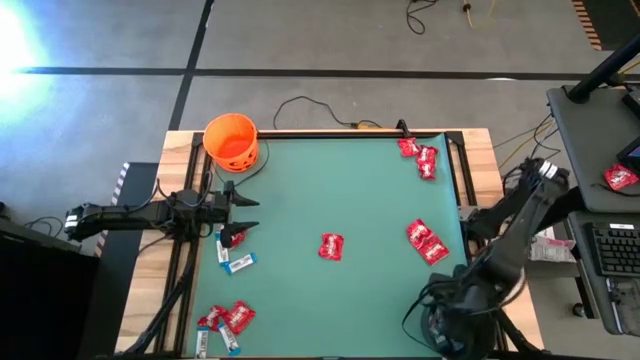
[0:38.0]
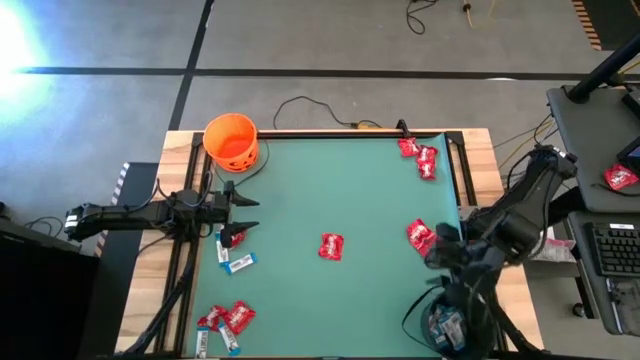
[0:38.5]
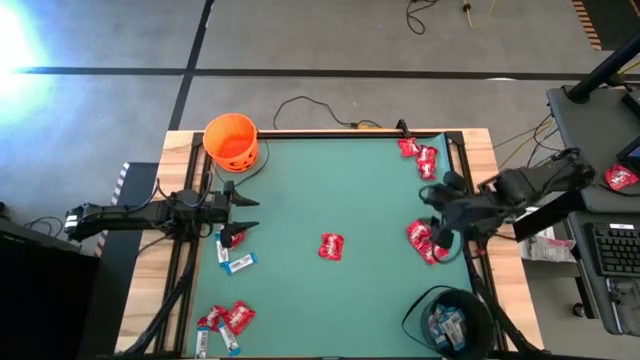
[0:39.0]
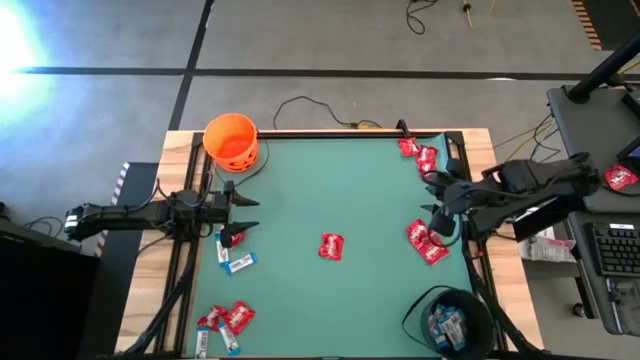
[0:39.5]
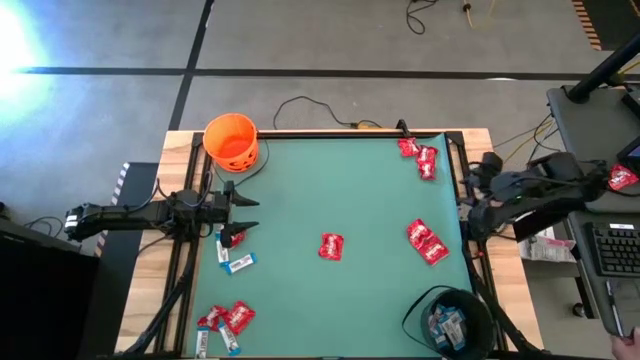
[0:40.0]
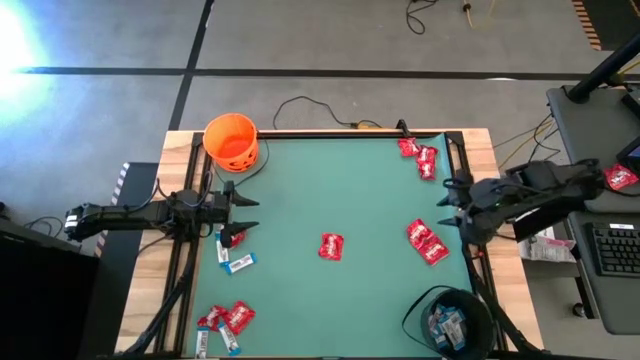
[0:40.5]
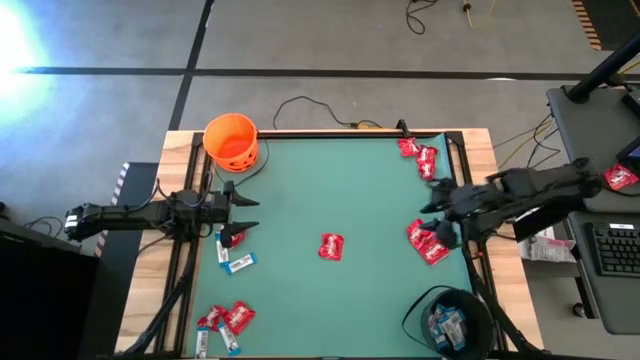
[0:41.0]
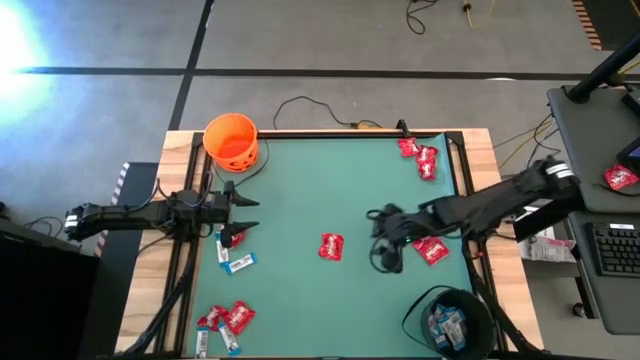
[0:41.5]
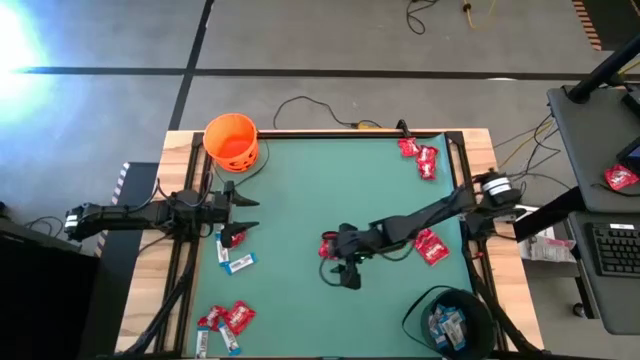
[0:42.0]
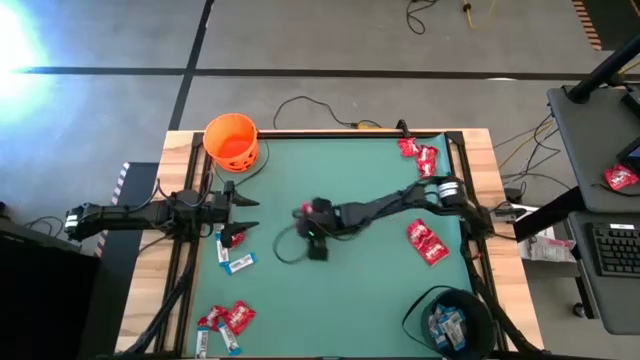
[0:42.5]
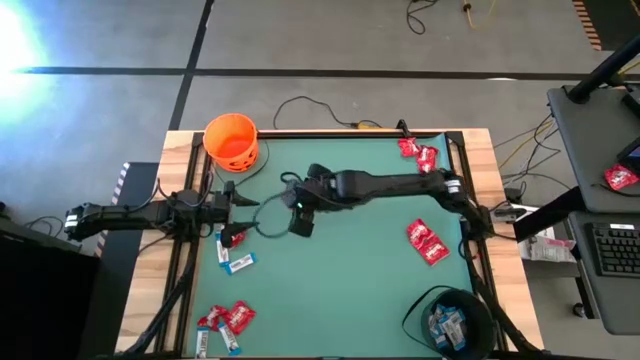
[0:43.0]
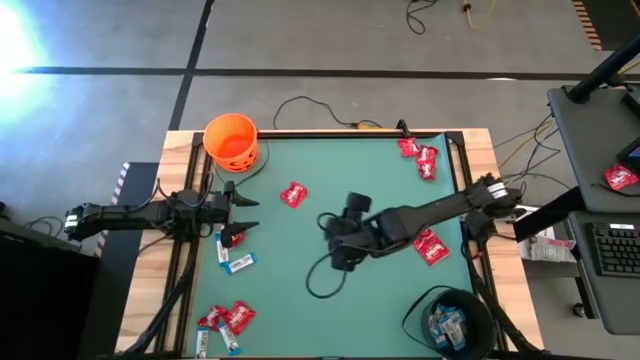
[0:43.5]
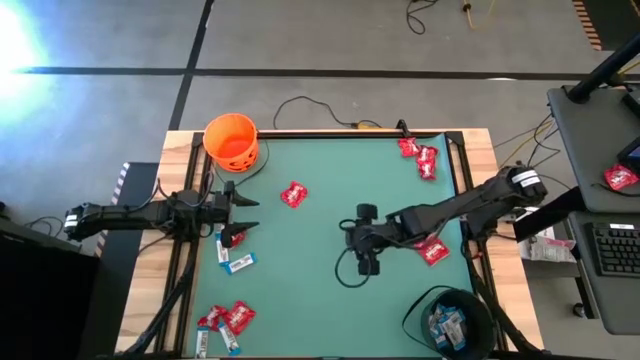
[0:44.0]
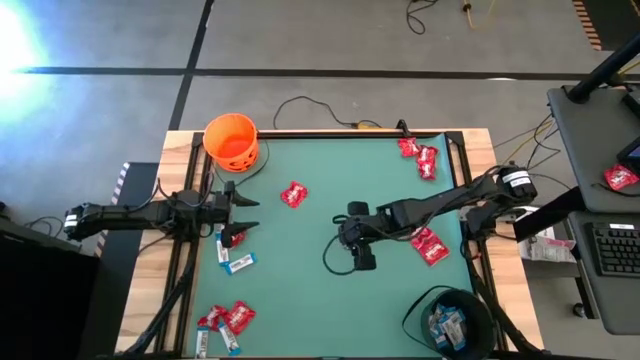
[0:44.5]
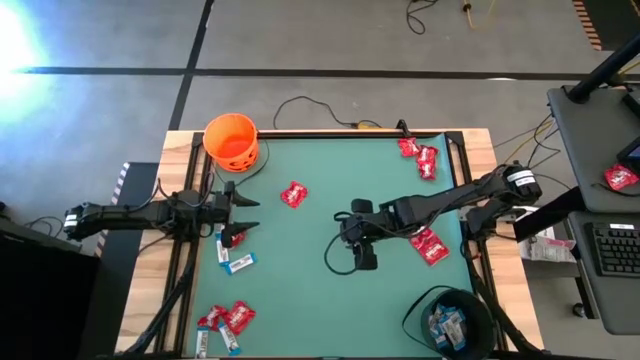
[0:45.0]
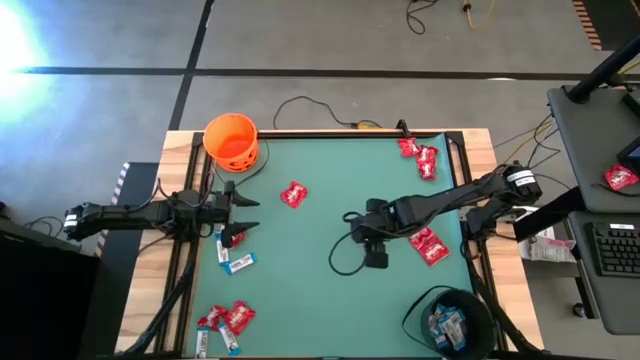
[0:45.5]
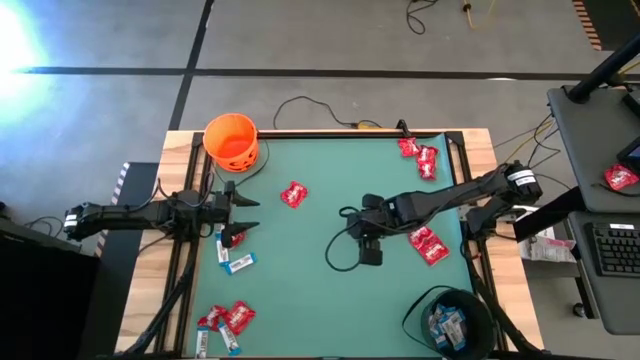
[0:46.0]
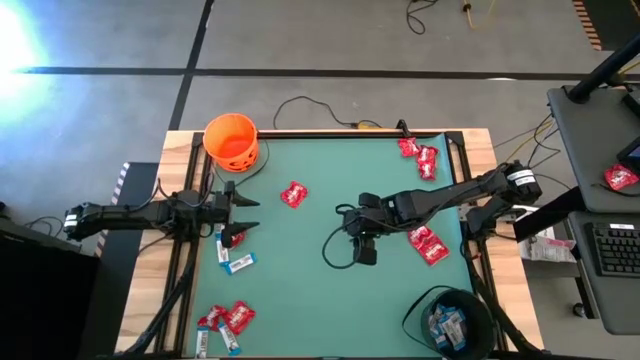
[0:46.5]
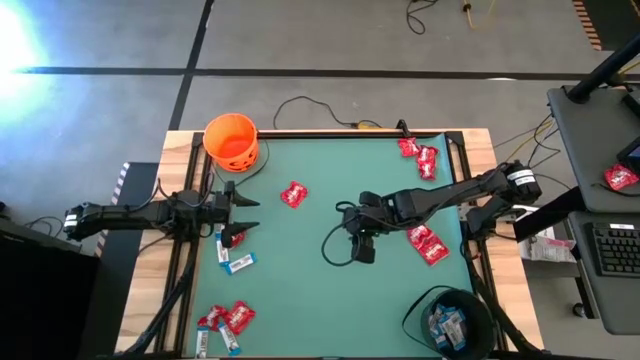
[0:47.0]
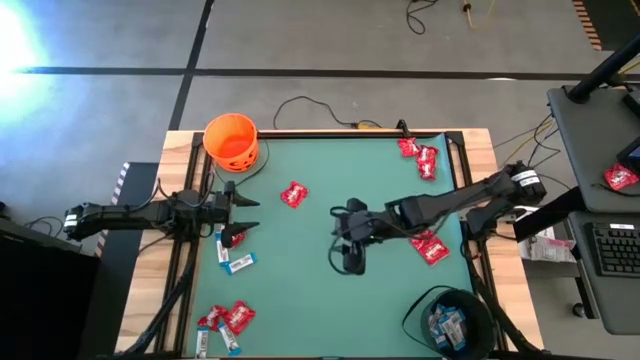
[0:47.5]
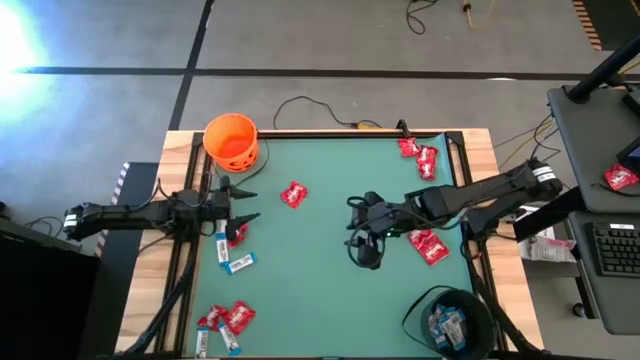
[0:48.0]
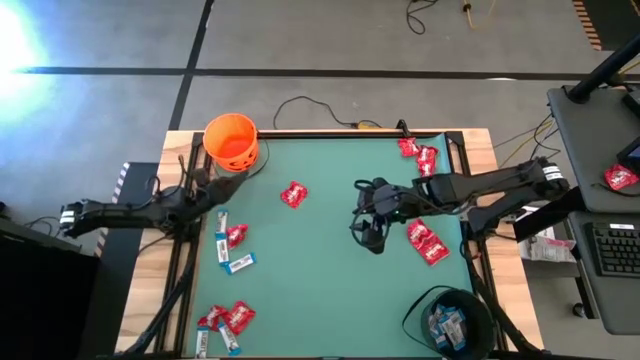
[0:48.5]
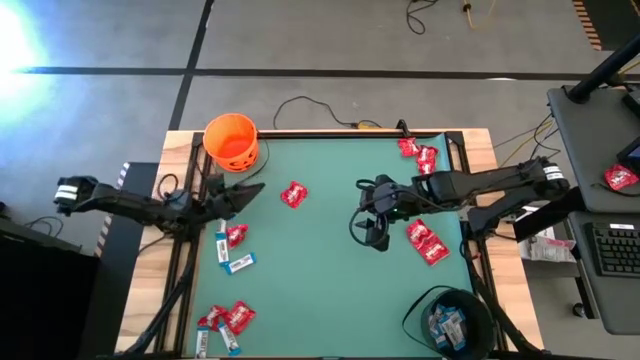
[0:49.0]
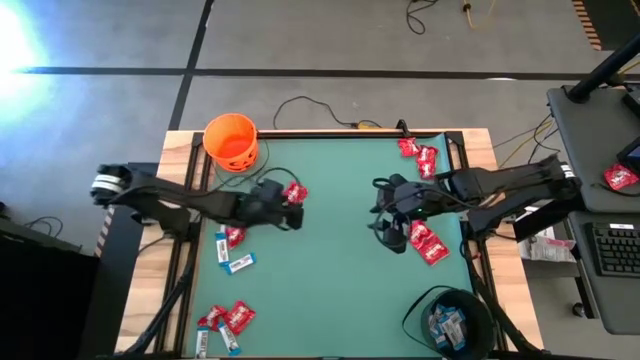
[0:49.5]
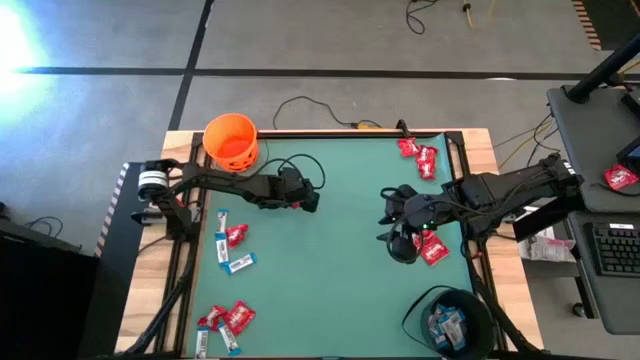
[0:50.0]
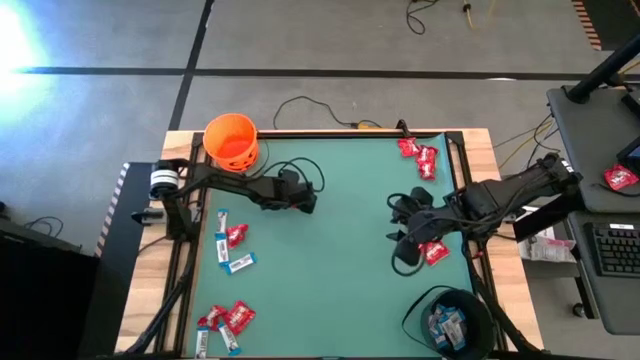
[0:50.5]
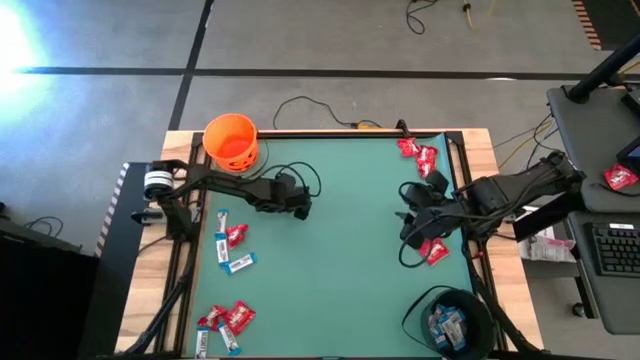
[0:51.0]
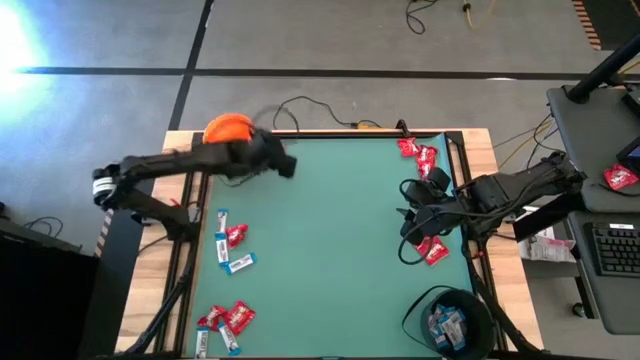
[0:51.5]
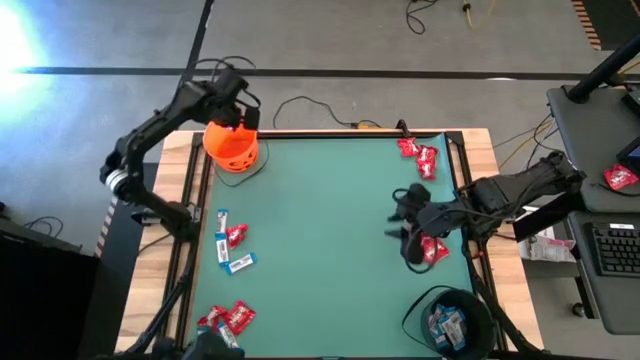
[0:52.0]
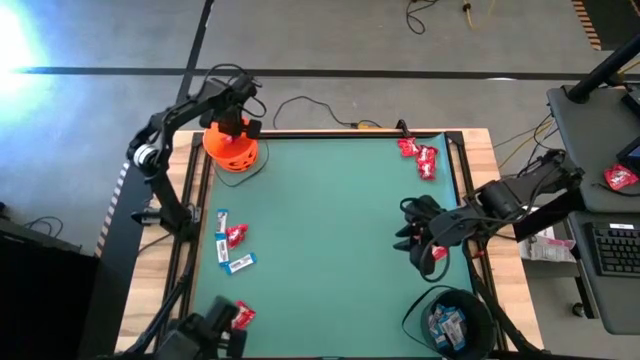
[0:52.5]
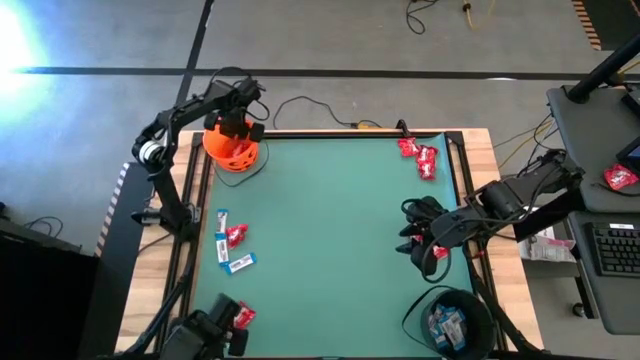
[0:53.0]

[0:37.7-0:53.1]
Task: Sort candy by brand, put in halloween buckets
Put the red candy into the orange bucket

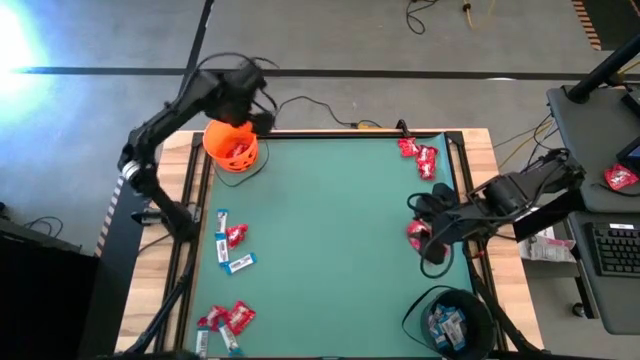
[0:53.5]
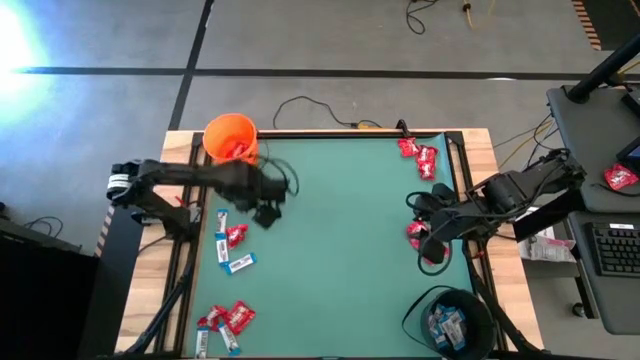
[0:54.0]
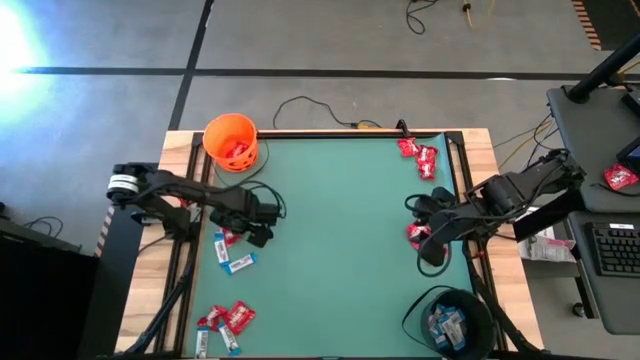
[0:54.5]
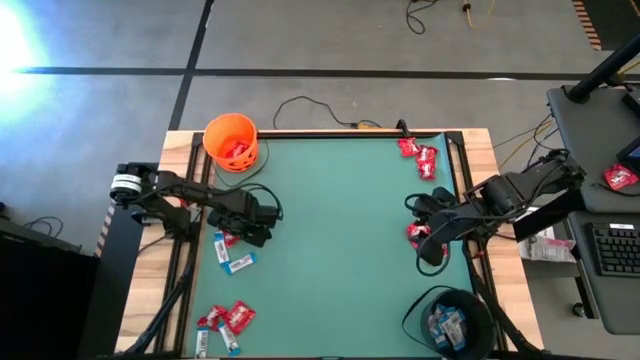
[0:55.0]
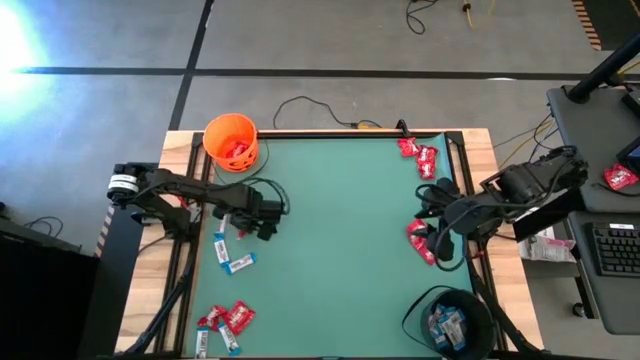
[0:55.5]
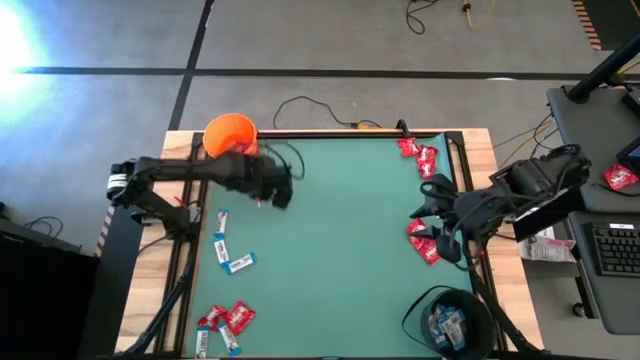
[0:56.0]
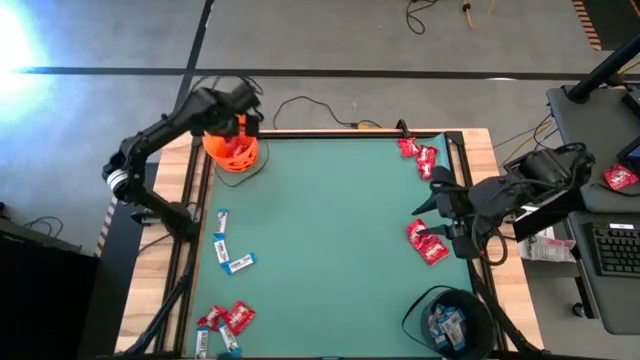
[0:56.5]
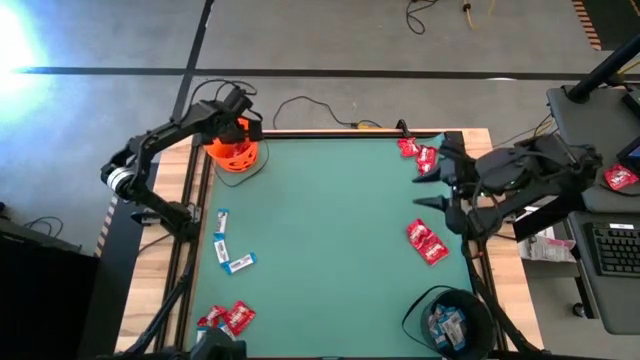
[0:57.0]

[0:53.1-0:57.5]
Put the red candy into the orange bucket

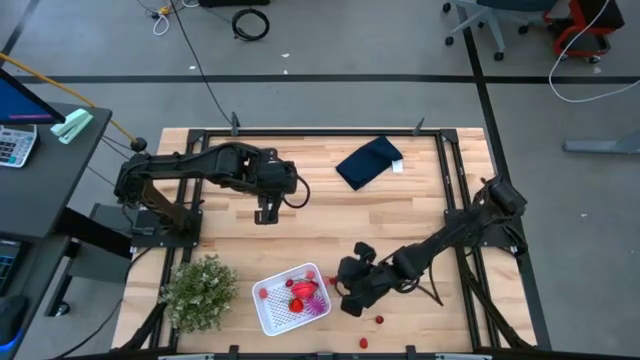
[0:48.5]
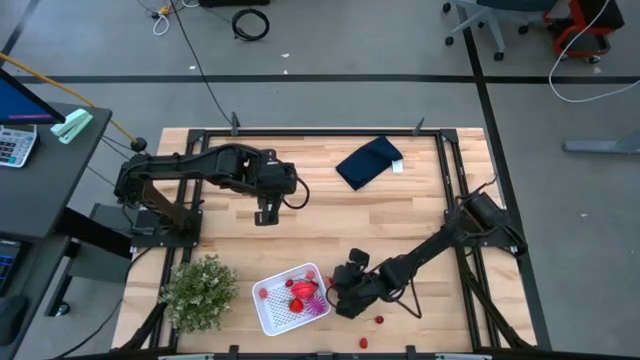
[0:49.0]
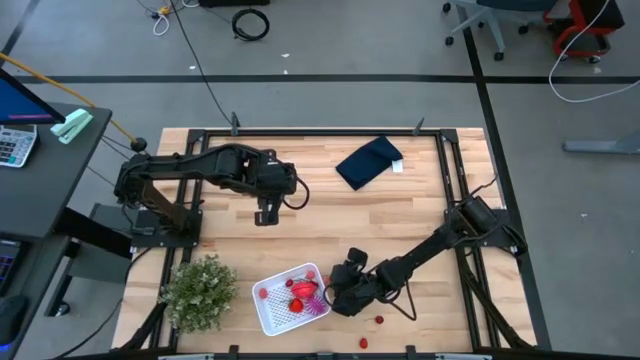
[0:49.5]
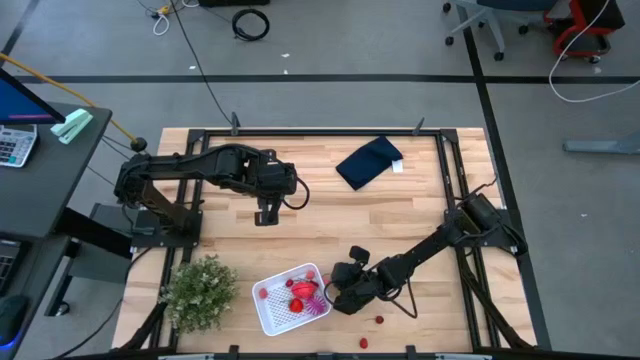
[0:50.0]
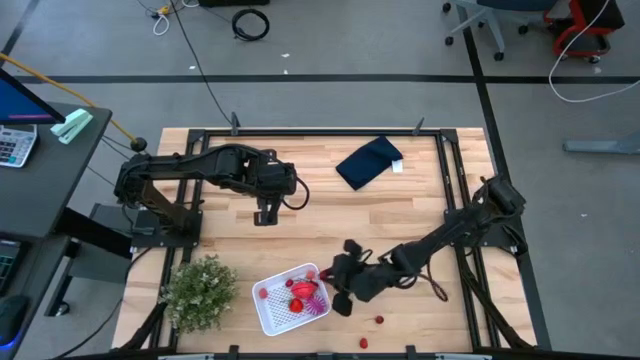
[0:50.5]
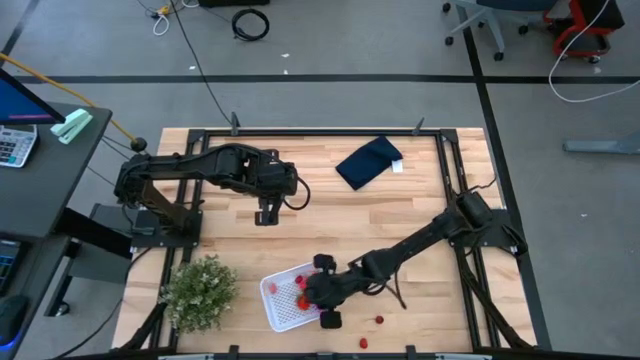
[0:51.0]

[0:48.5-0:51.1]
Task: Pick and placing Produce into tupperware
Put the cherry into the white bin

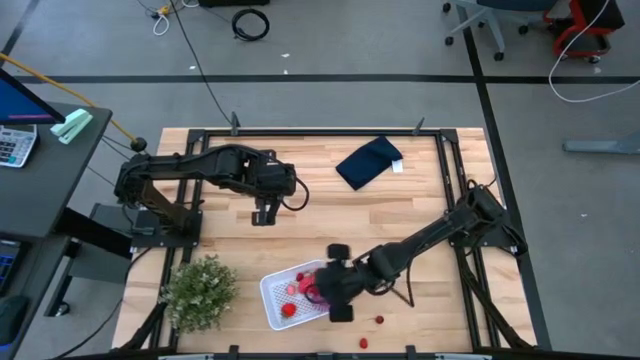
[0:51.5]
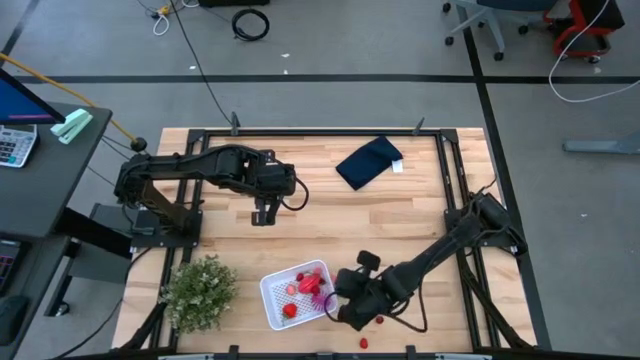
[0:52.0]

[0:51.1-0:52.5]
Adjust the white bin
